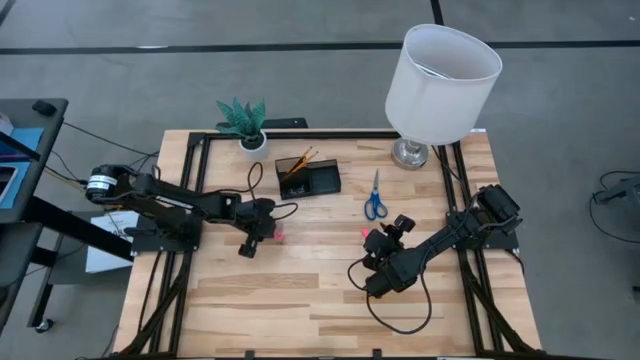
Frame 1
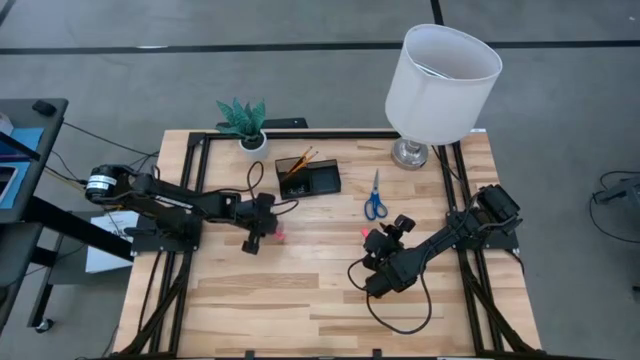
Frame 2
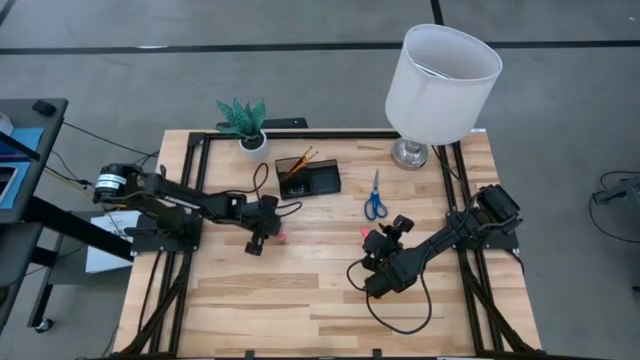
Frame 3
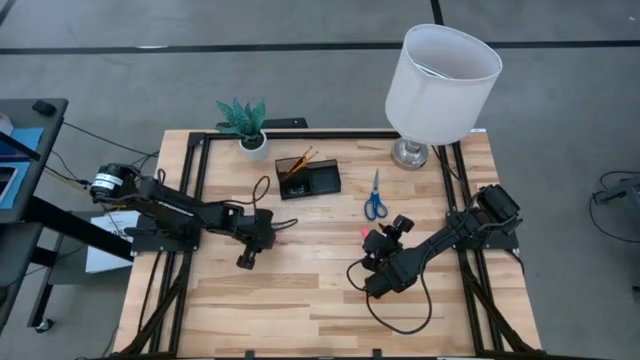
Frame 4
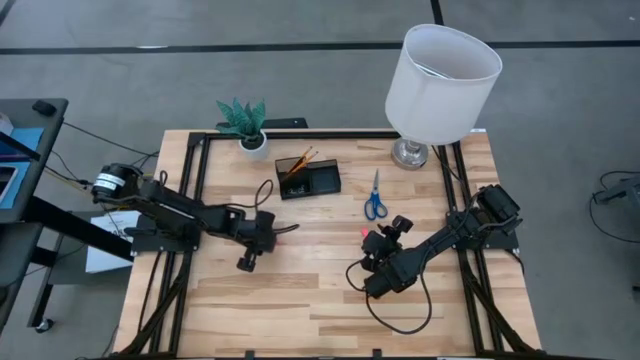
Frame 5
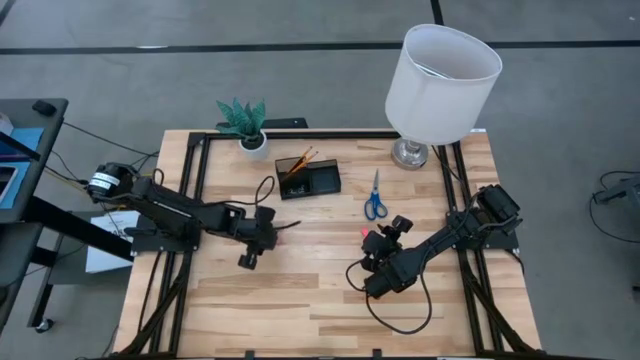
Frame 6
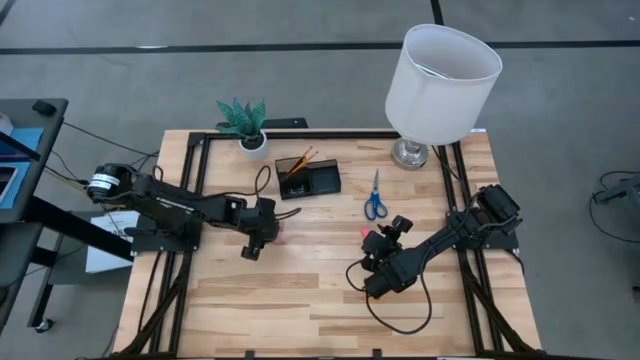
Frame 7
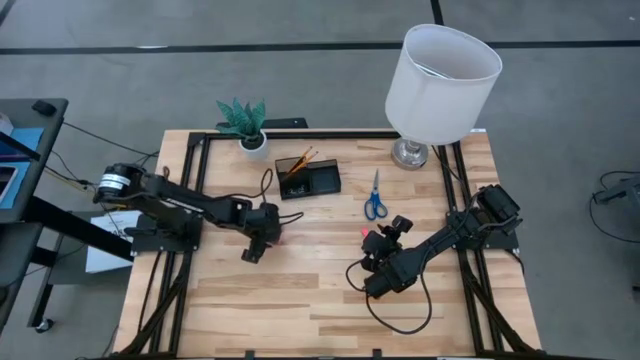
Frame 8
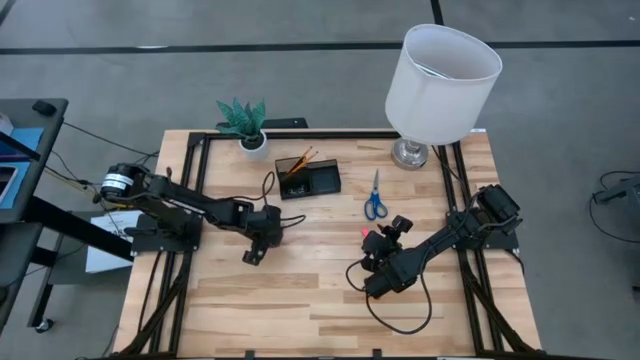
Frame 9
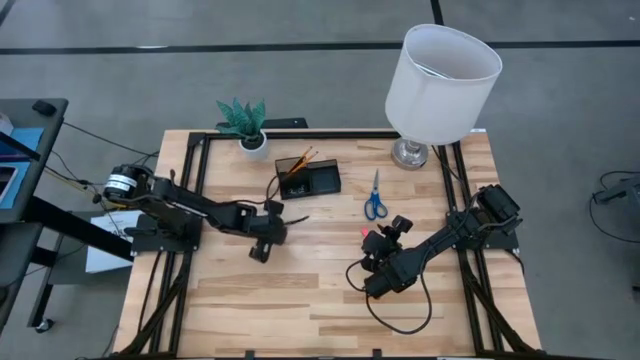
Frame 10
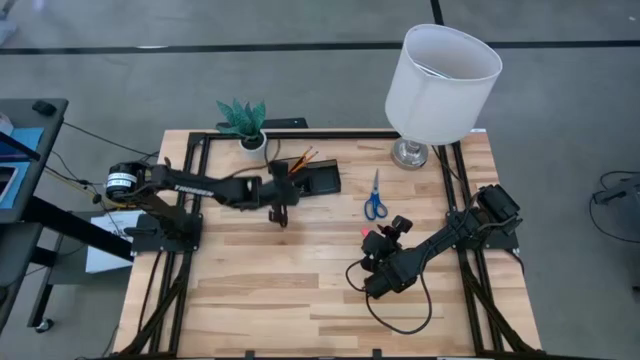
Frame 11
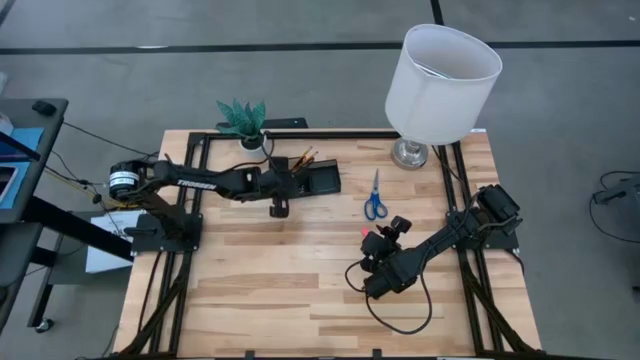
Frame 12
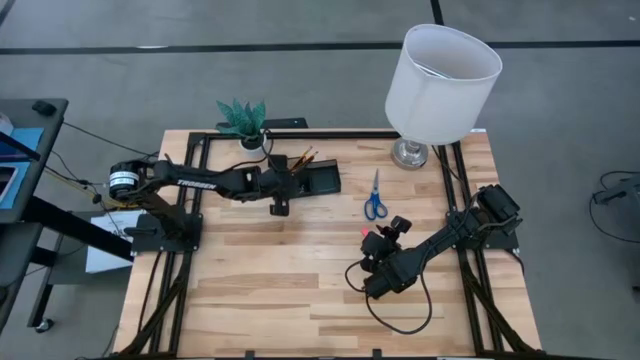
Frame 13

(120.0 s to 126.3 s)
Task: Pick and place office supplies into organizer
Put the left pink eraser into the black desk organizer

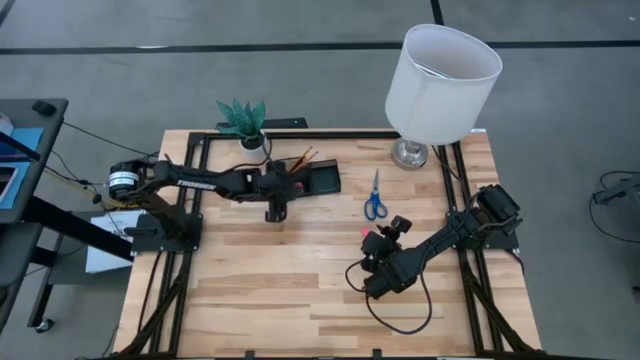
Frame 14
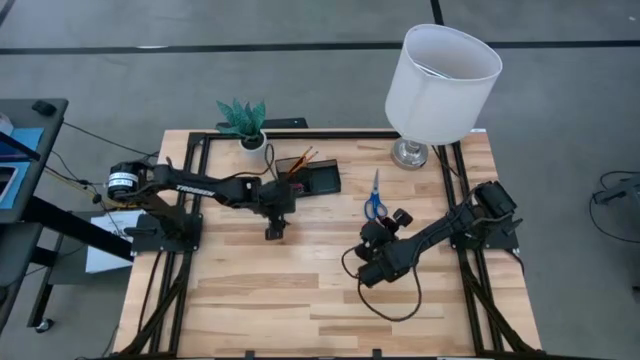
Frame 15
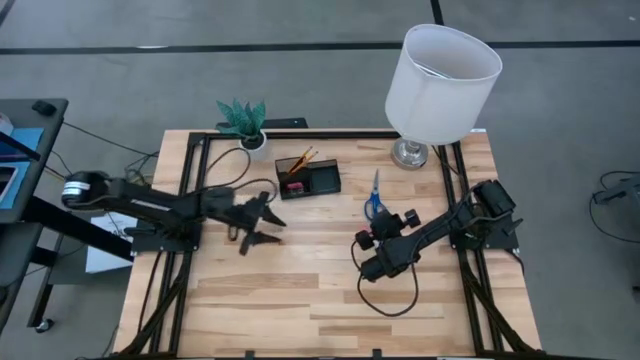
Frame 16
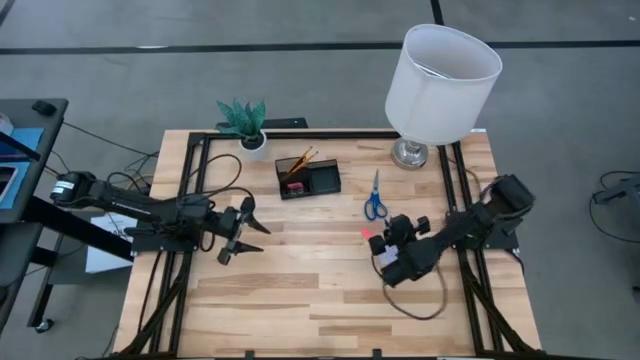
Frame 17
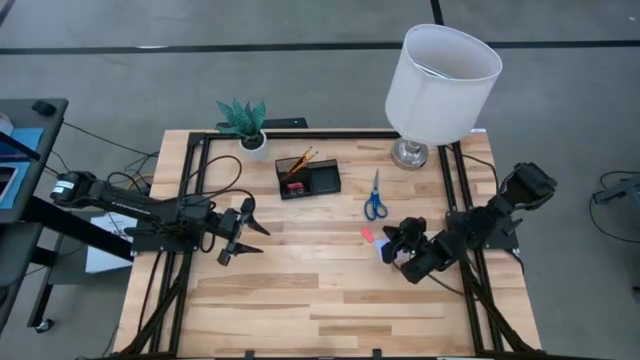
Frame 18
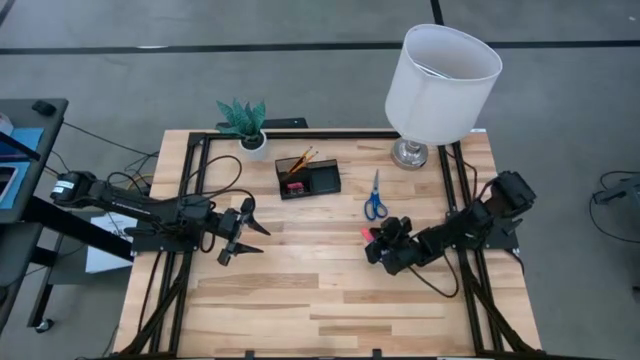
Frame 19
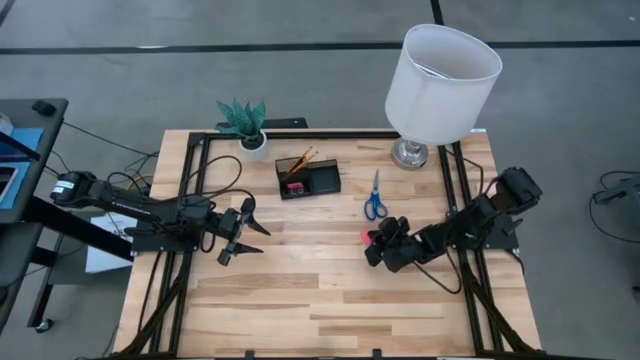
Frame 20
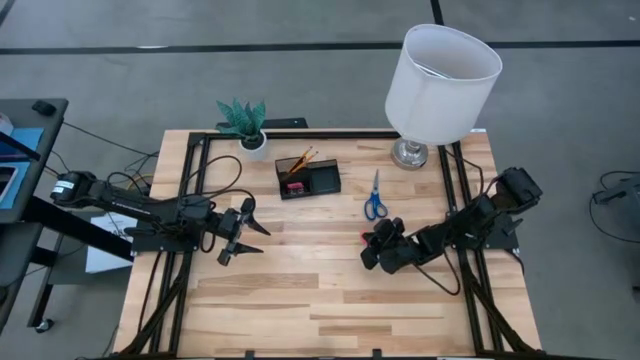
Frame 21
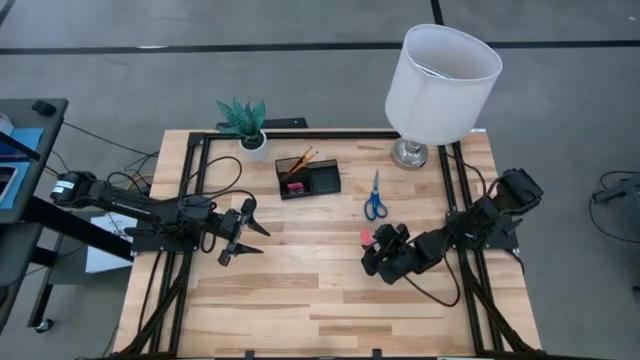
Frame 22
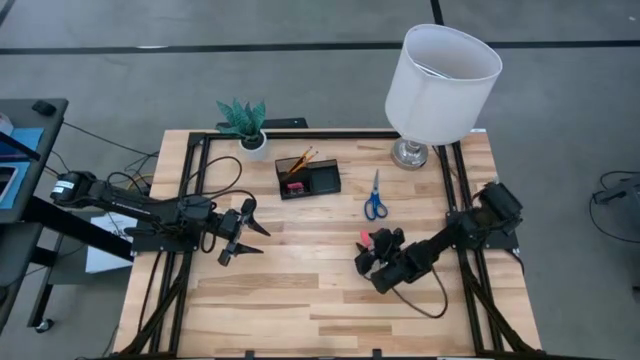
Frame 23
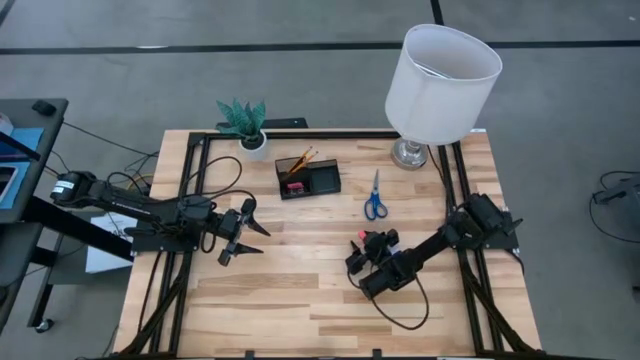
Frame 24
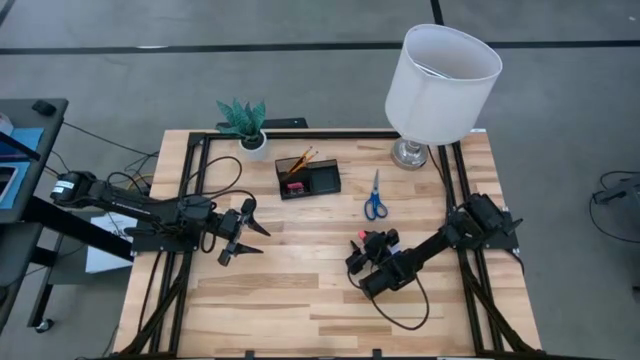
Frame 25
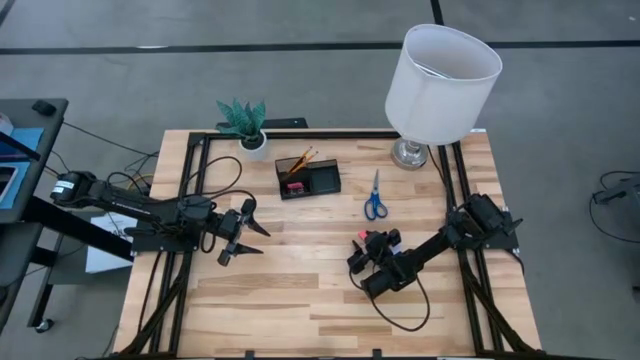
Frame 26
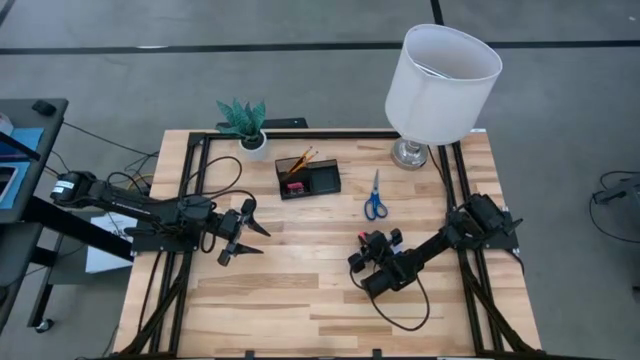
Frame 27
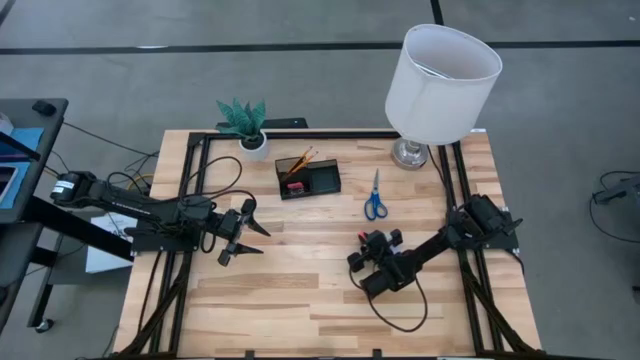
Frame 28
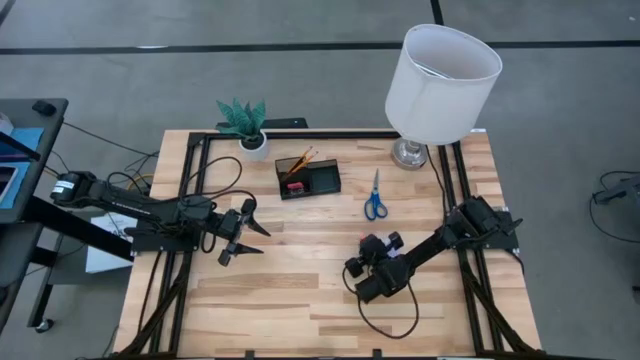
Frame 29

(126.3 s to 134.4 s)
Put the pink eraser into the black desk organizer

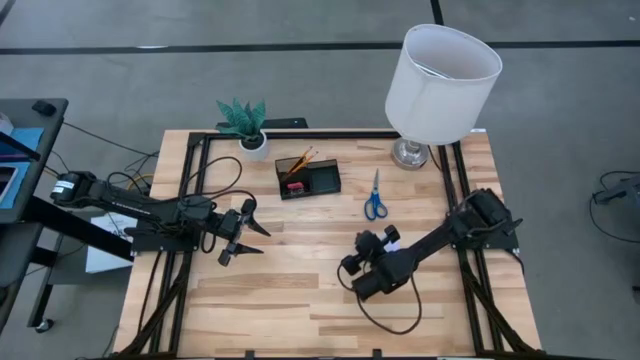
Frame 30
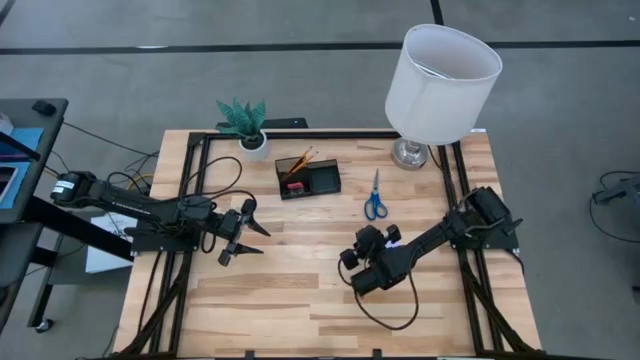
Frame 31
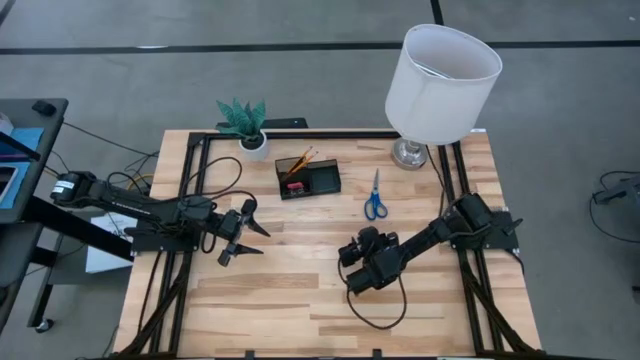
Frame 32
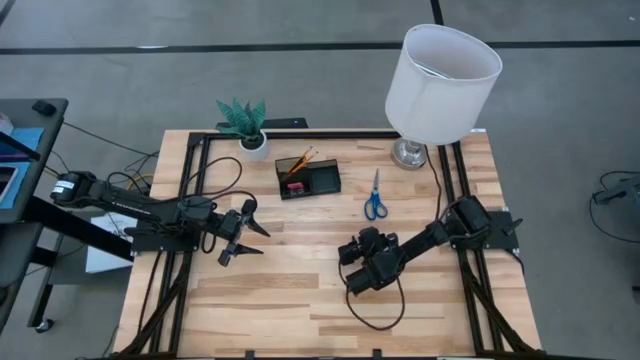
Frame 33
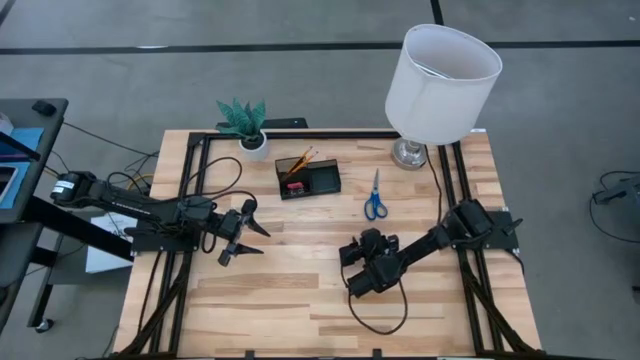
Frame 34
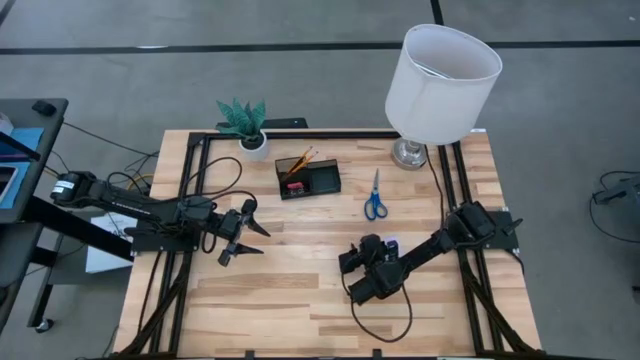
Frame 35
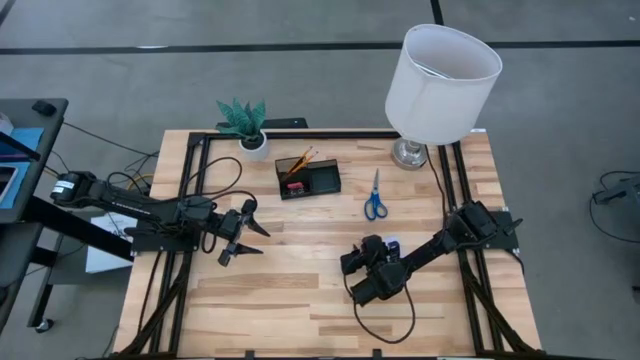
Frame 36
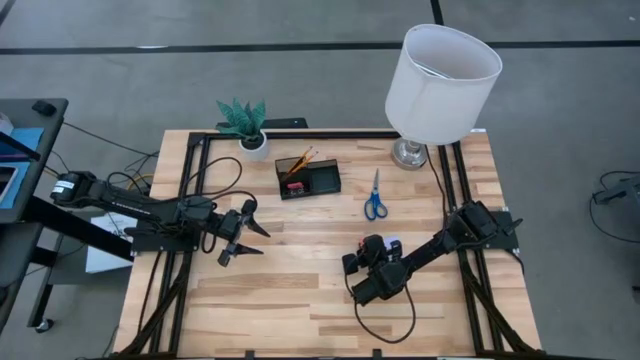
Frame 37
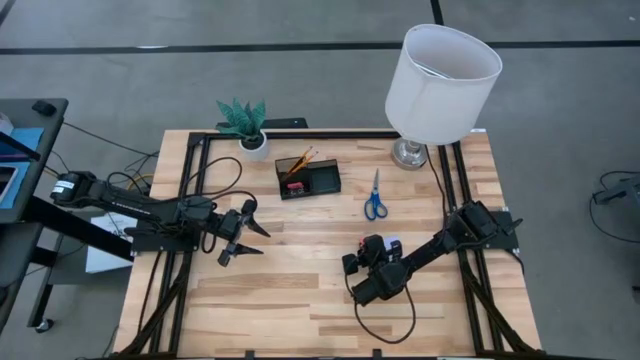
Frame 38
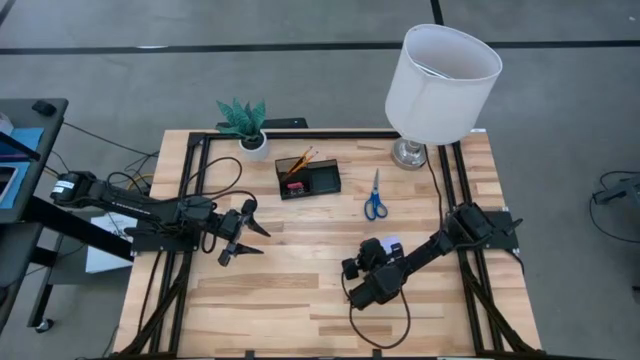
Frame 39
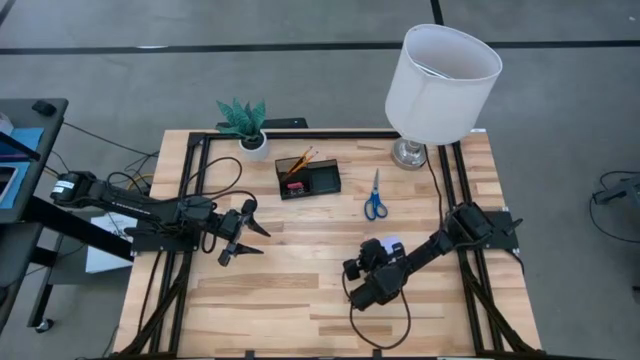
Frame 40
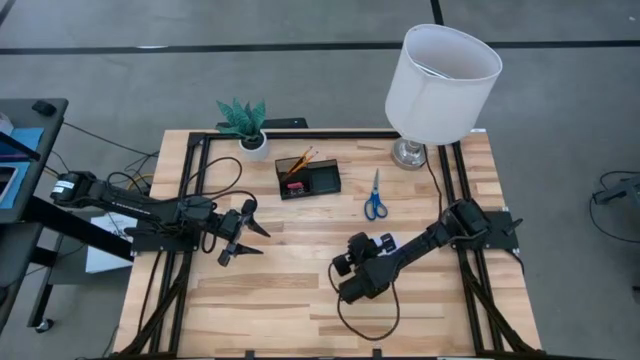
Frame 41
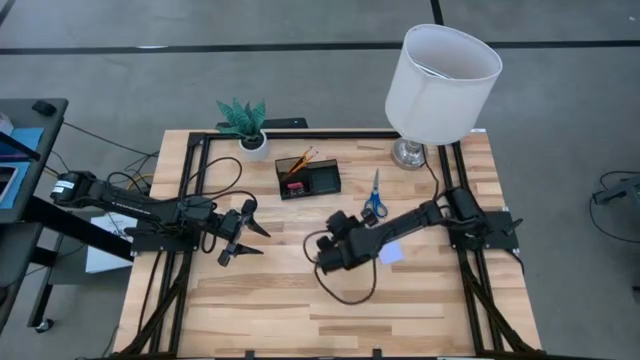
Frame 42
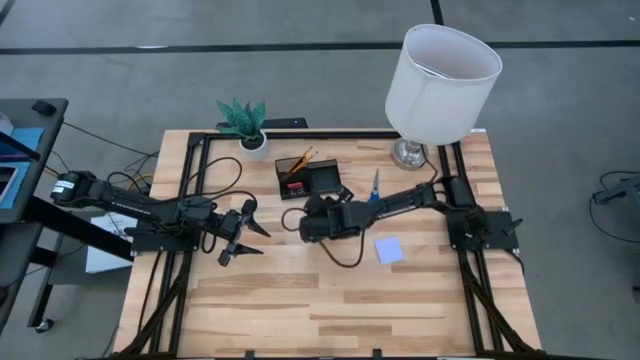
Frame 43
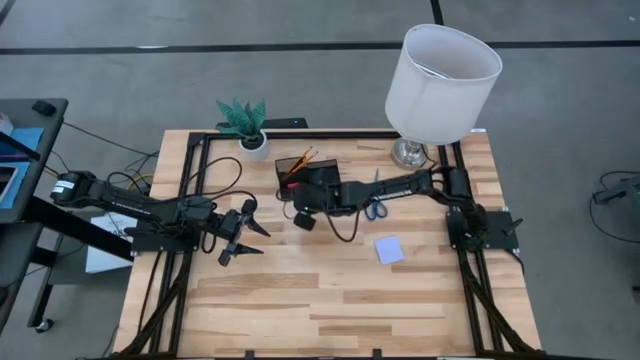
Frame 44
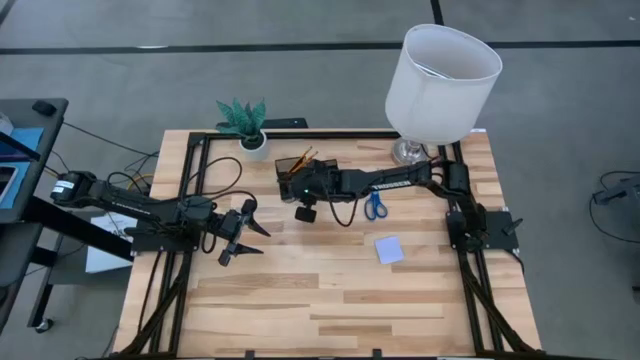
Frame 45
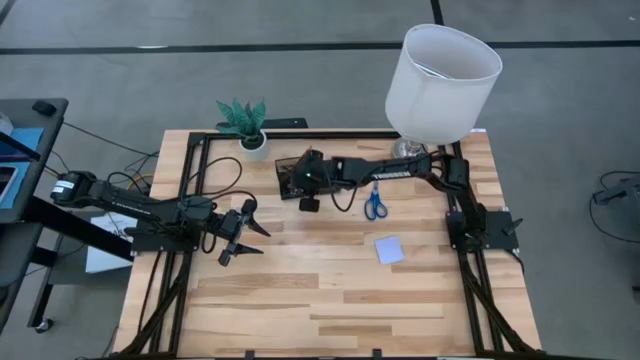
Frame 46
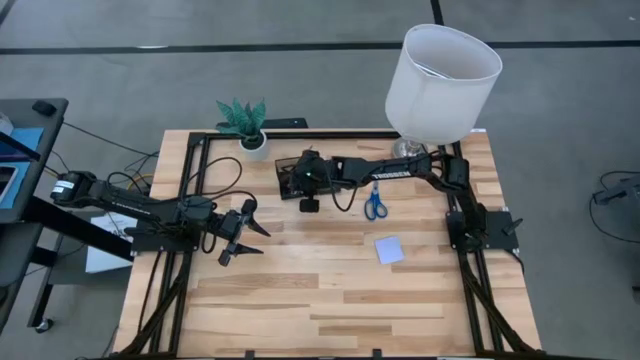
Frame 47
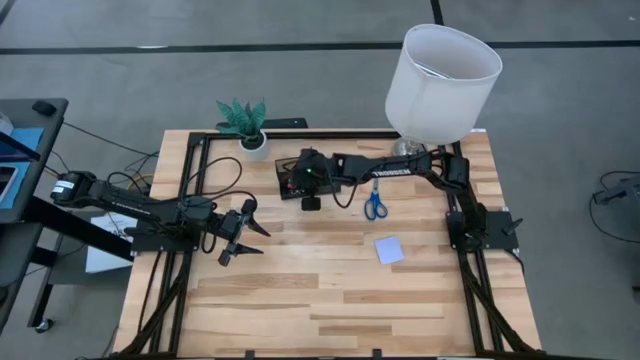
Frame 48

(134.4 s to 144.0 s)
Put the pink eraser into the black desk organizer
